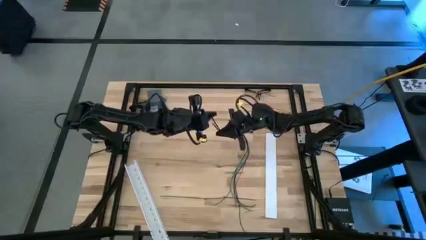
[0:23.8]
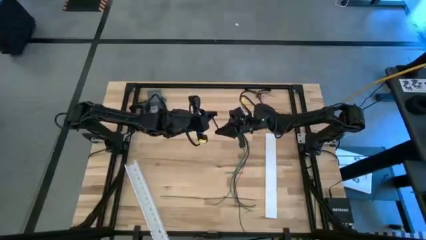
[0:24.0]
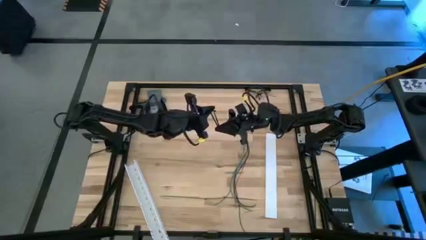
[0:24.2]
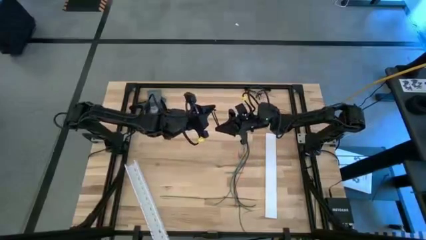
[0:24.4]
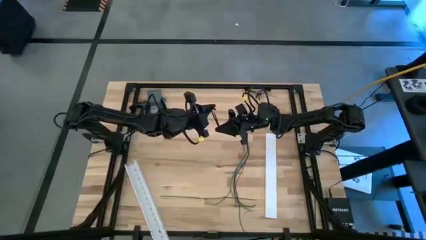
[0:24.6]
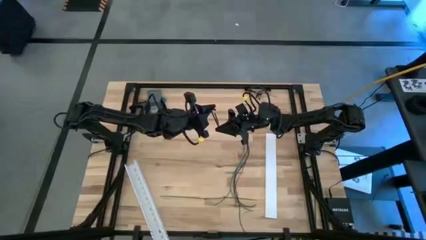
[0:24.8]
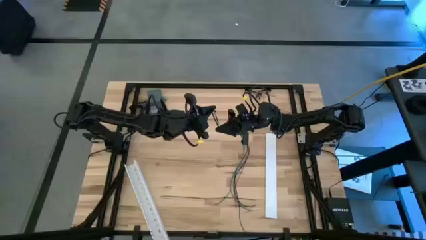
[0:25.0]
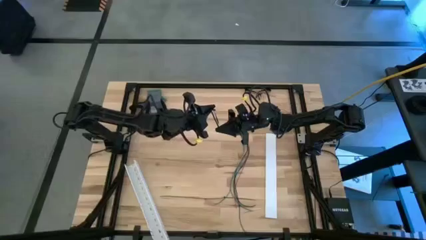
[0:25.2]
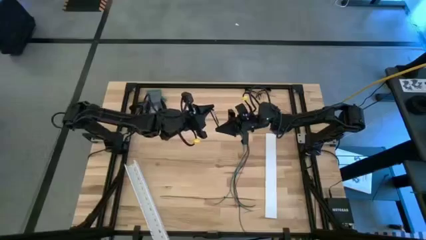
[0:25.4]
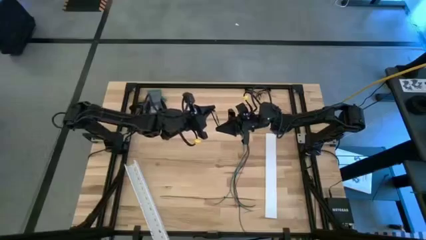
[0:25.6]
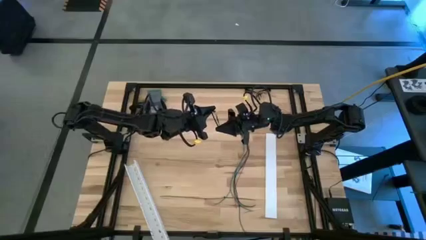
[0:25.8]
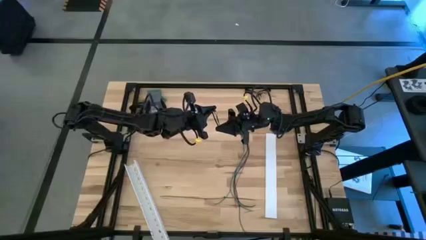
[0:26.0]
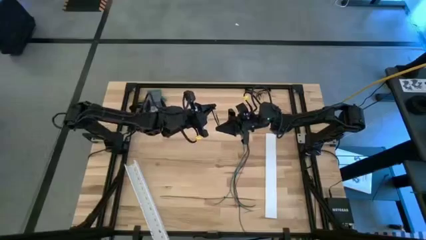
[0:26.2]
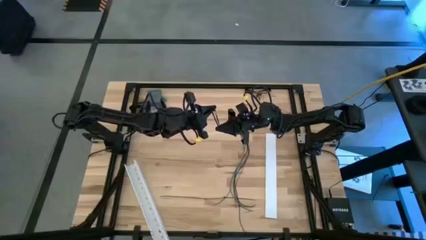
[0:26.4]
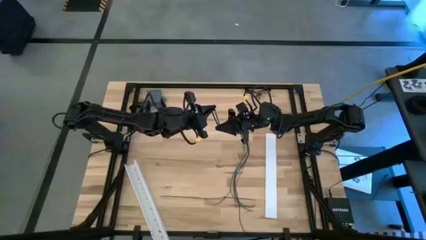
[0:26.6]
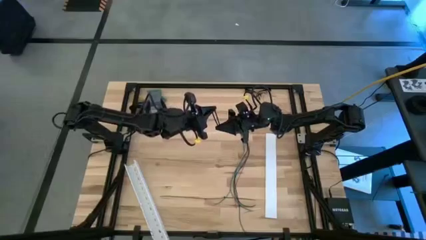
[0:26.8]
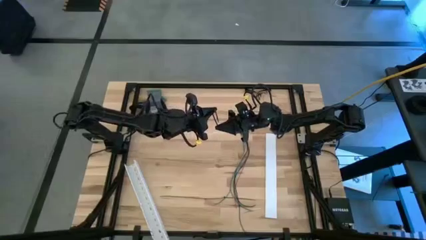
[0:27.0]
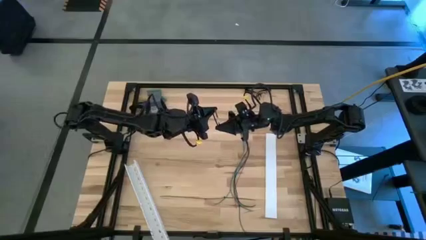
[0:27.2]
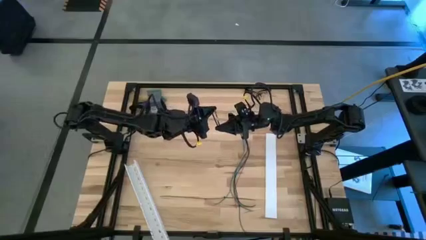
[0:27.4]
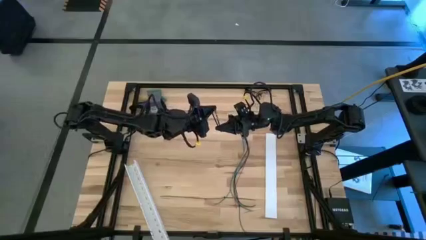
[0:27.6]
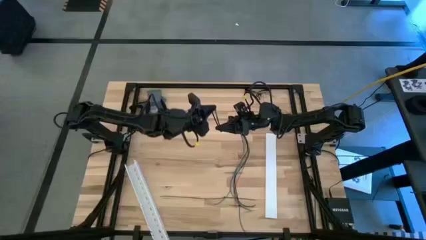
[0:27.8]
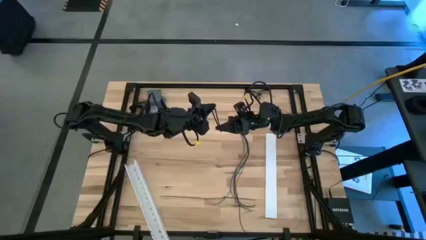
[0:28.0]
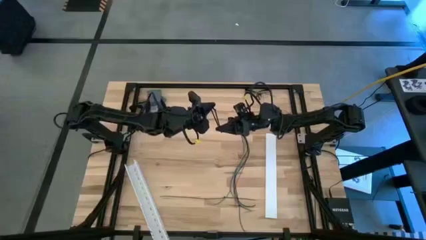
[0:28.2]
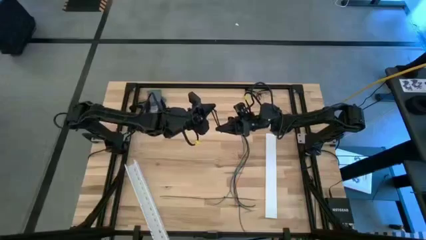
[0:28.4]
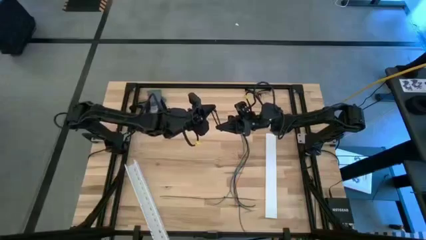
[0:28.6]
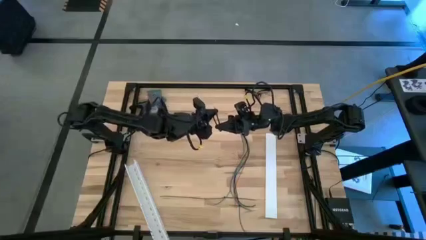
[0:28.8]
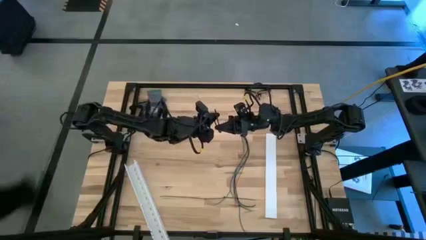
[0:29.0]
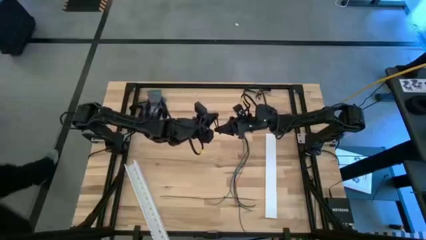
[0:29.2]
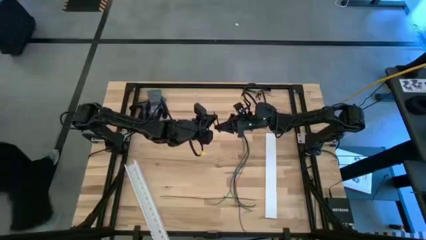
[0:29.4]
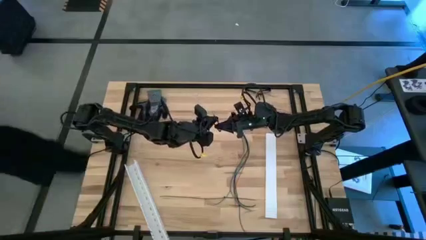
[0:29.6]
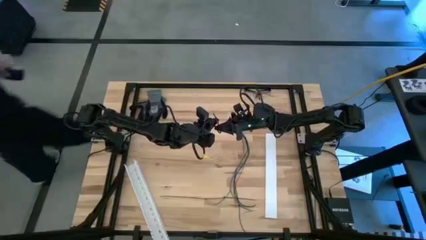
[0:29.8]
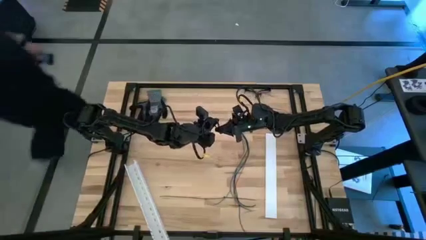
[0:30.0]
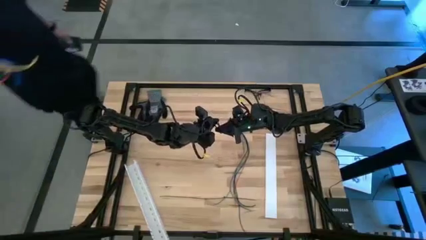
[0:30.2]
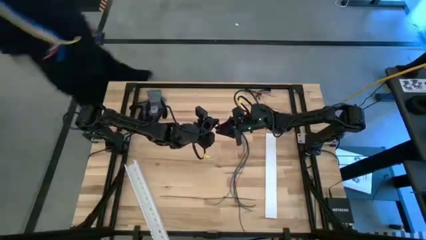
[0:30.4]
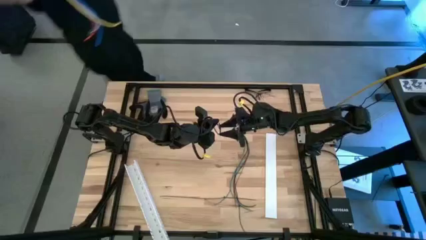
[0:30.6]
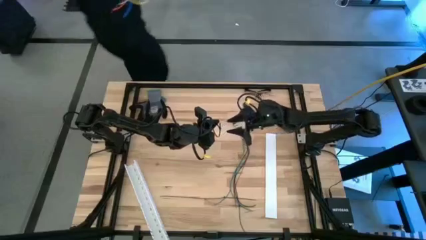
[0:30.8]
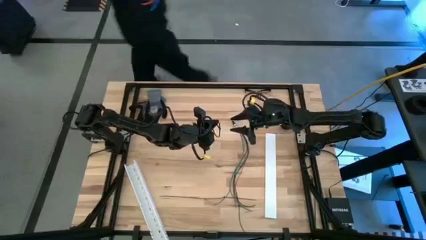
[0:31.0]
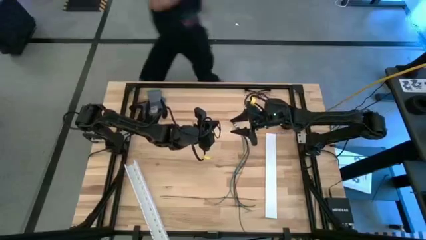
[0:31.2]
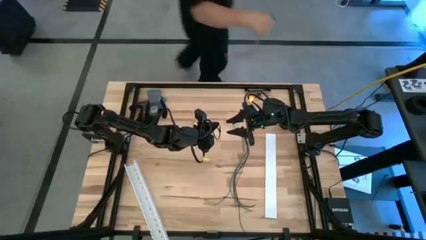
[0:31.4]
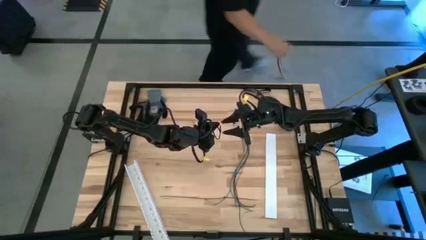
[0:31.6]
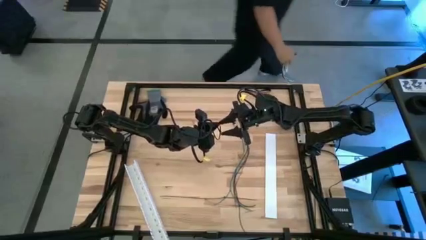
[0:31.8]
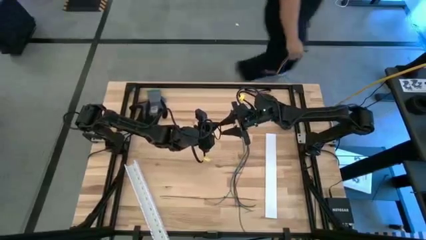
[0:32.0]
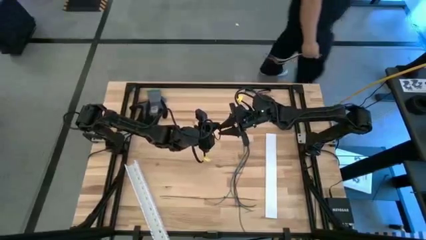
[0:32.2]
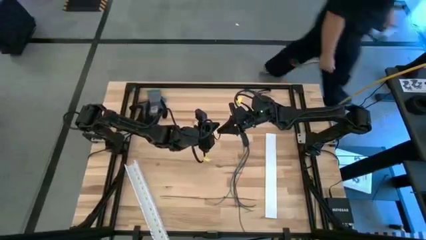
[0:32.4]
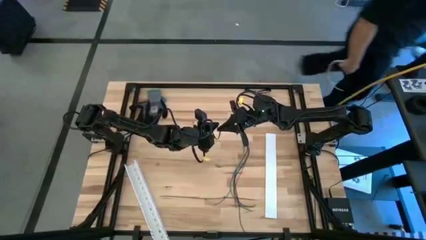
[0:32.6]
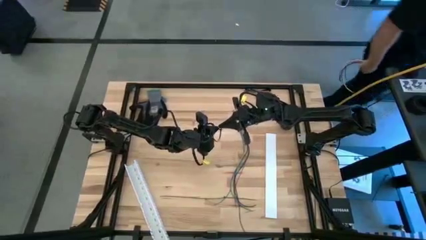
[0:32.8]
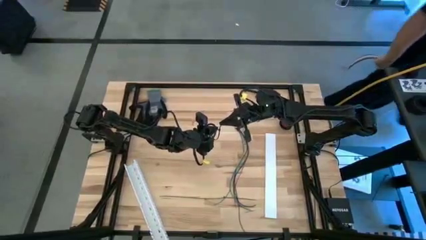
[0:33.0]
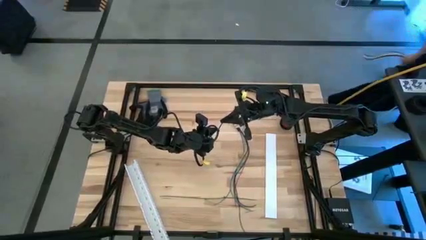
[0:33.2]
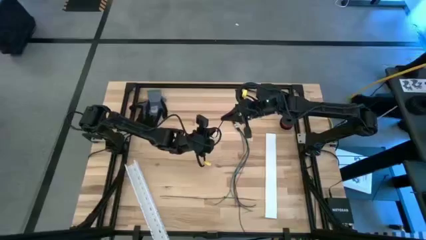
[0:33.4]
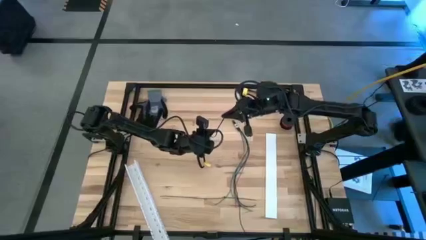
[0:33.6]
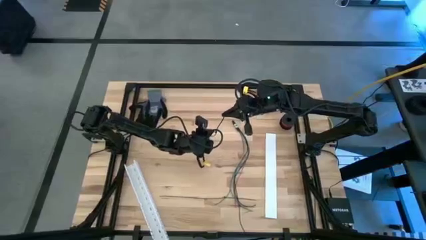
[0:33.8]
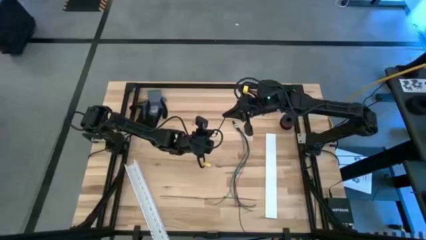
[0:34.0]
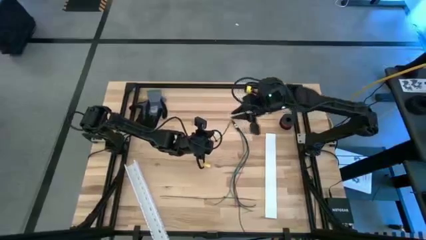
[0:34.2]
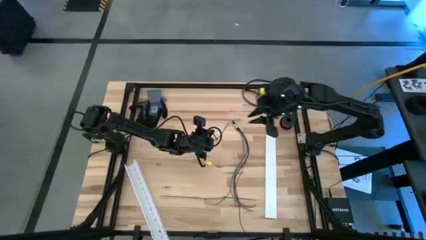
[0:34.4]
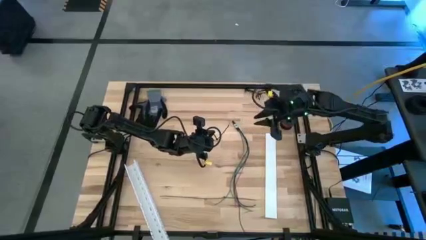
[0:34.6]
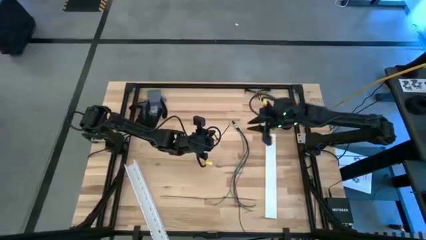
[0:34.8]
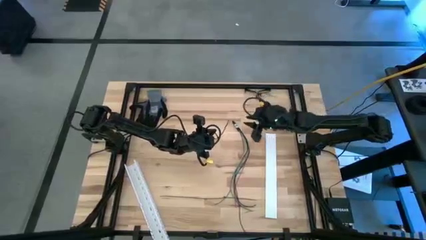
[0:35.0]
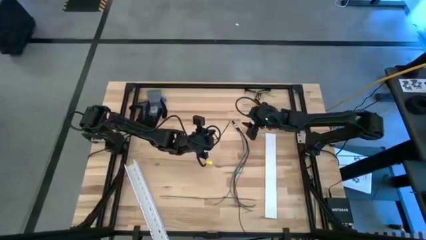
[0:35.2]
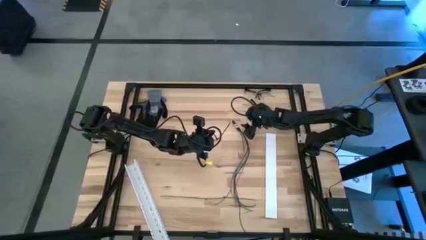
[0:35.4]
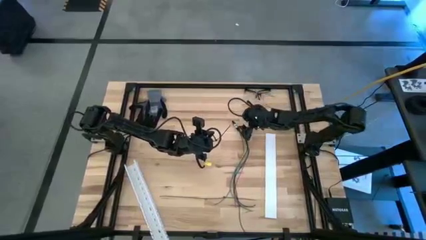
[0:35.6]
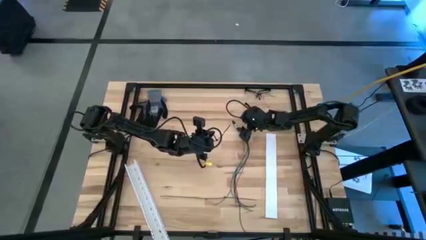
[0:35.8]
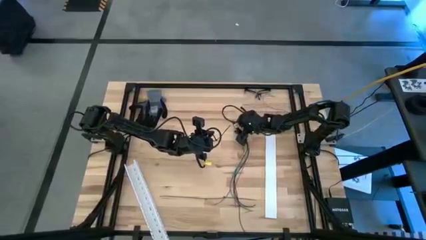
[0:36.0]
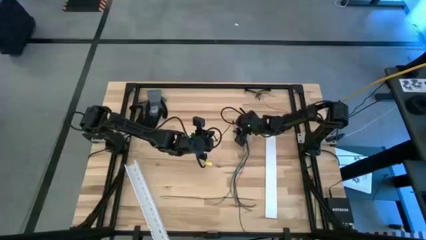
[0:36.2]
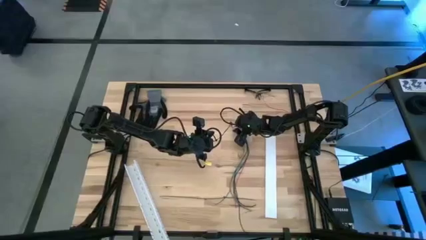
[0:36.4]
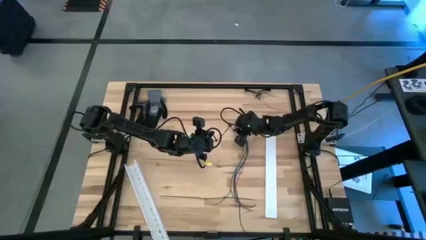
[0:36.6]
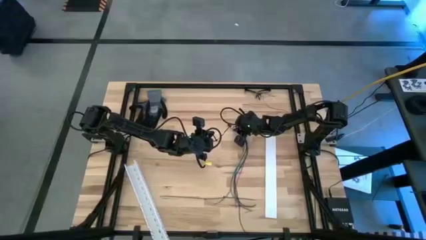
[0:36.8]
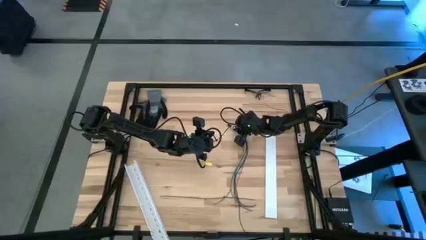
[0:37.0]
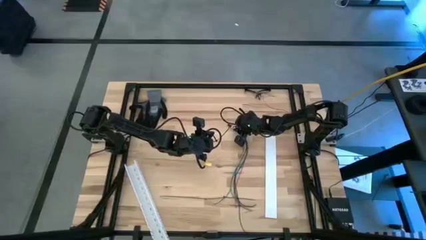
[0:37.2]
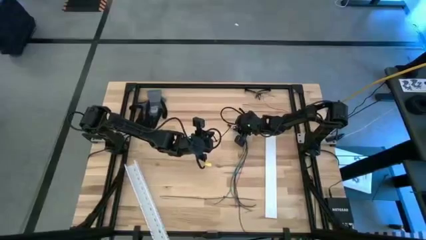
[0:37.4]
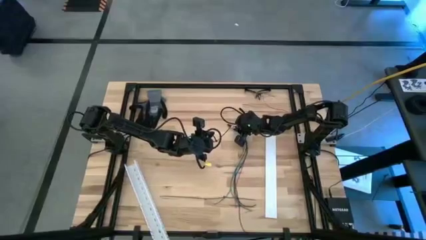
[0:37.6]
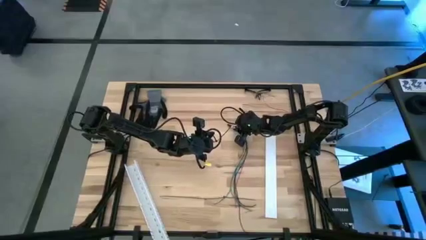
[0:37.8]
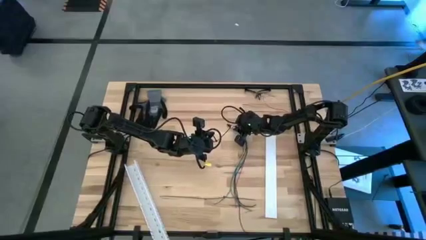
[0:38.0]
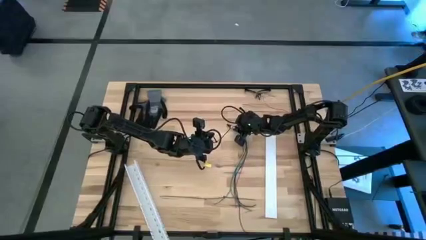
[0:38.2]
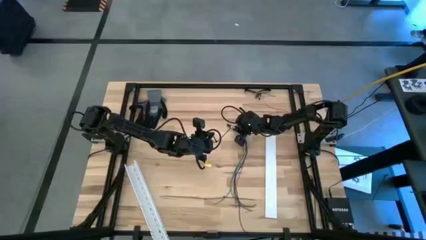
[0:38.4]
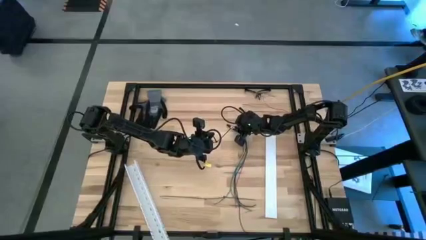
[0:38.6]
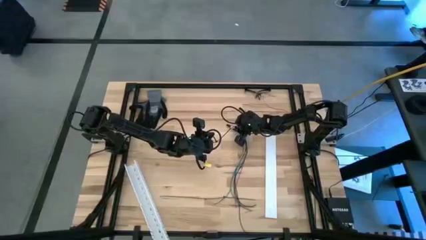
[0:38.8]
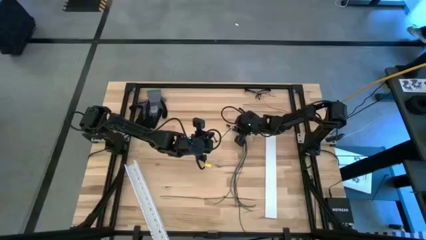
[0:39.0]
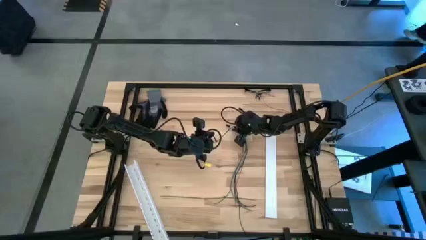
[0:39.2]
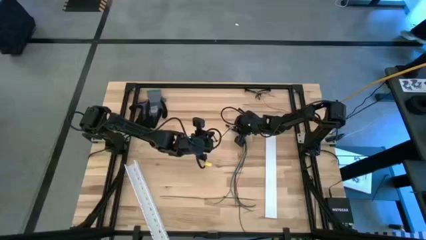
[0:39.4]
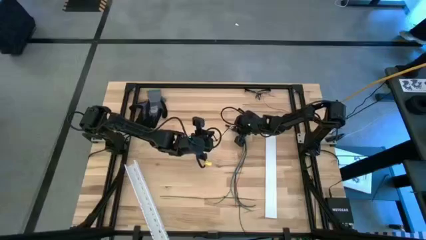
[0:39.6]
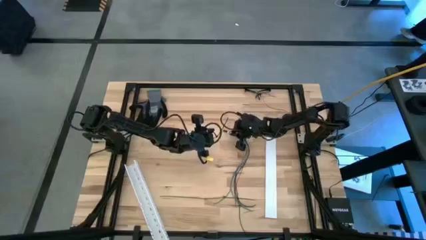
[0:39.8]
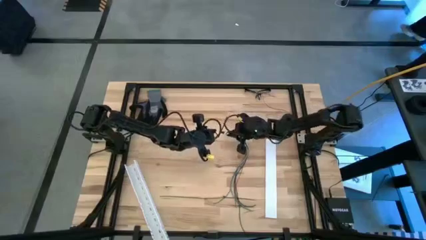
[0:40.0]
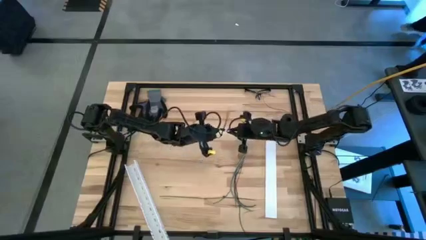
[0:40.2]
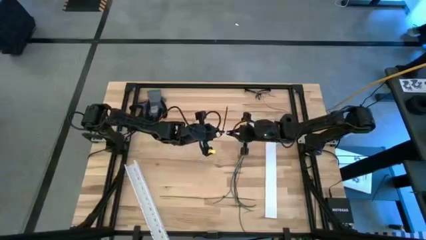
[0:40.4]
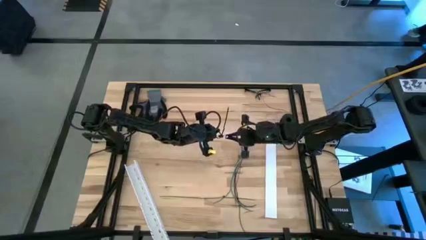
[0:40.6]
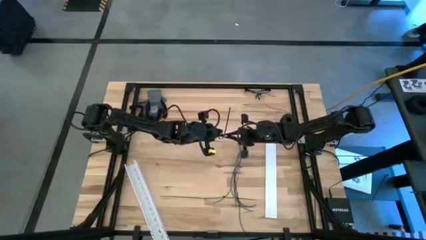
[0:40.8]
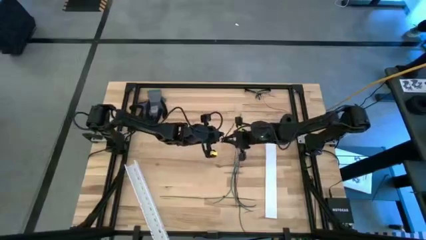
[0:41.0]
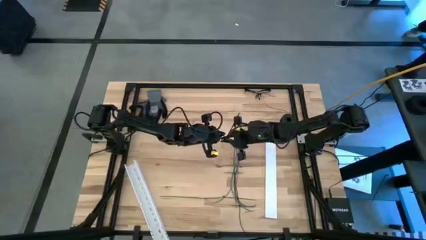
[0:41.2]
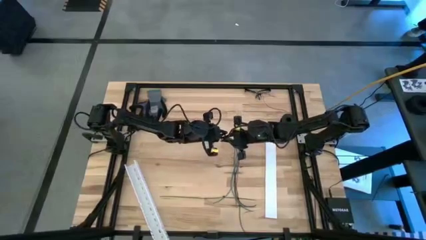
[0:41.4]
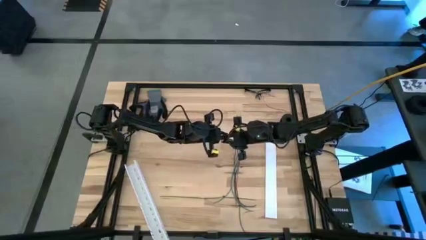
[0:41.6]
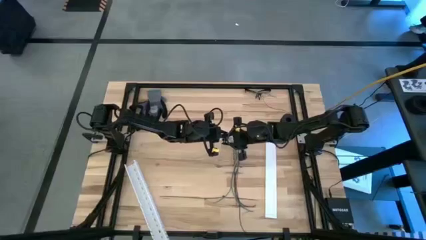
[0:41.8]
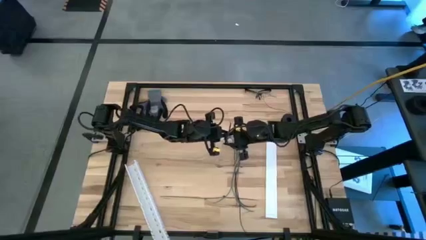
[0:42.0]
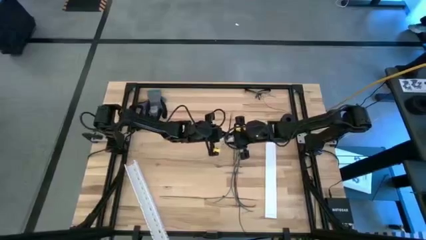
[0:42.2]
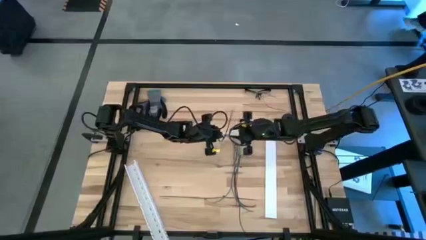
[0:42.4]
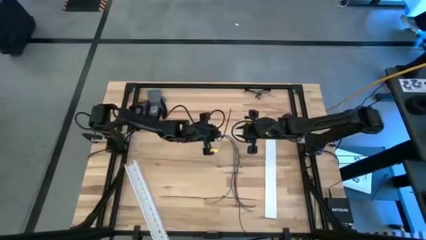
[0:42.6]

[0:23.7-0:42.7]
Task: Ziptie cables
Wrap the top black zip tie on the colored cables
